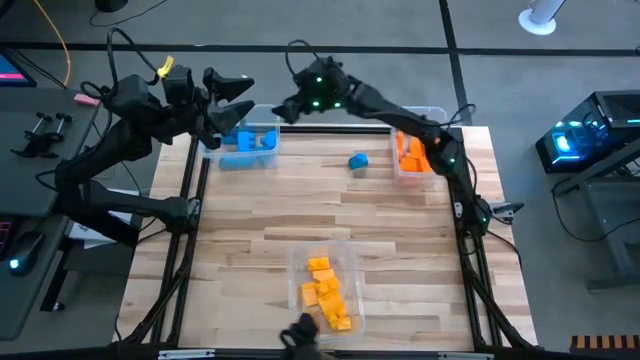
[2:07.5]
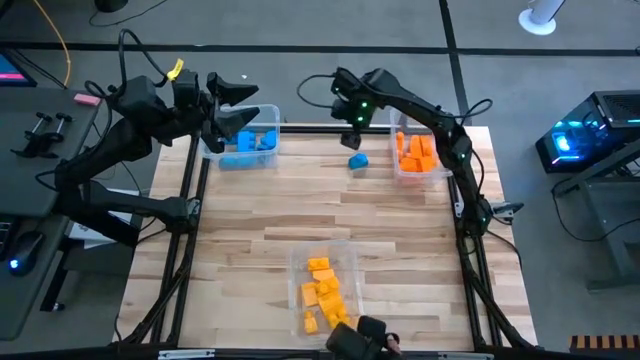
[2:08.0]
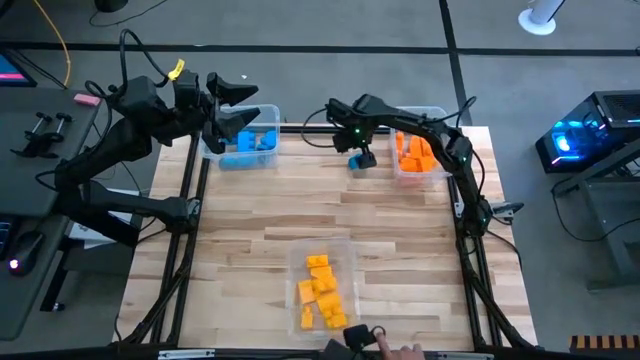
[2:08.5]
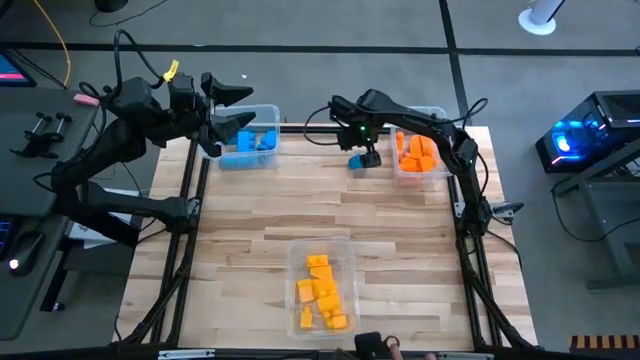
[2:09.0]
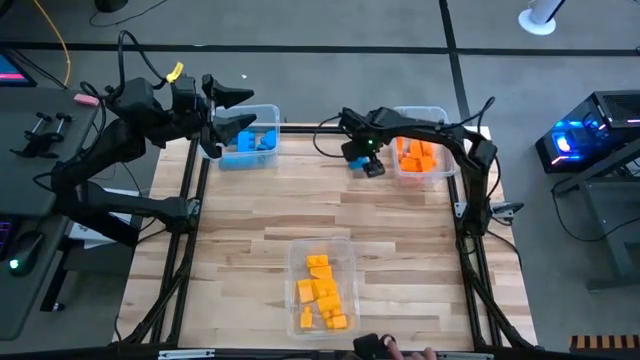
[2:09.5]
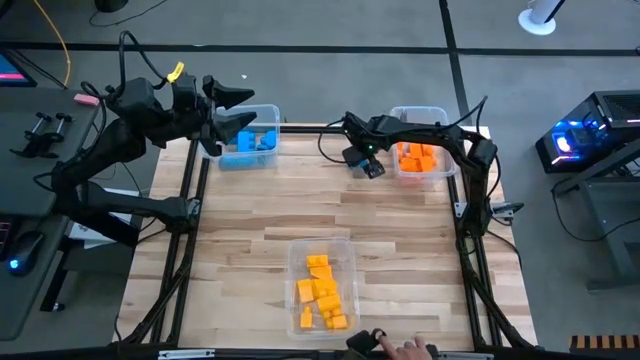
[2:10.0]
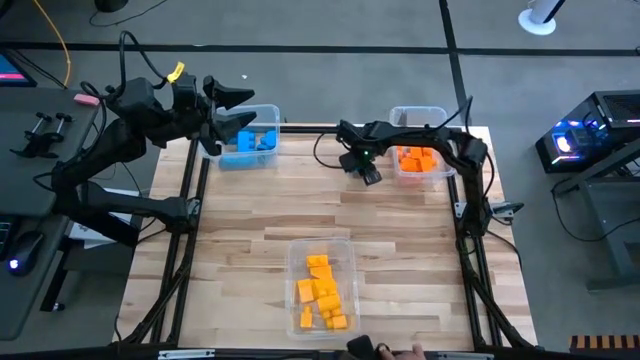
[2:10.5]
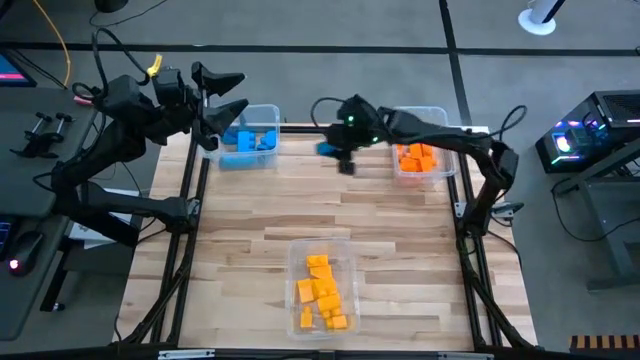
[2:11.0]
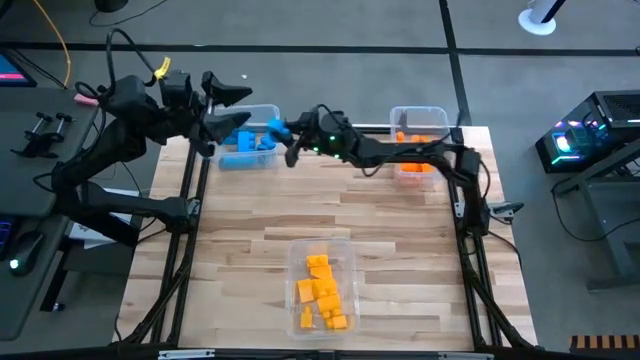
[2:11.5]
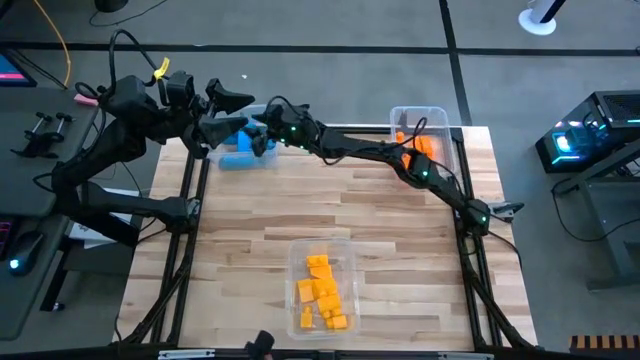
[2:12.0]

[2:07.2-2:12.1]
Task: Sort blocks
Put the blue game piece into the top left transparent bin

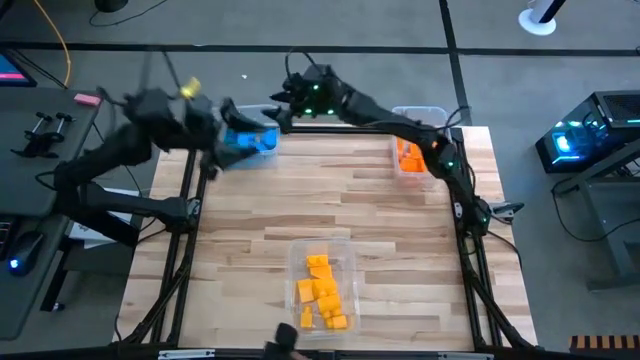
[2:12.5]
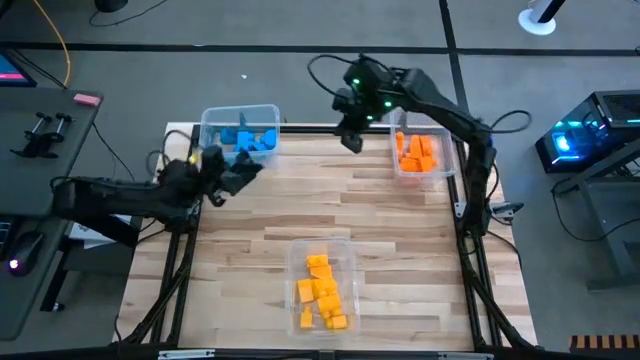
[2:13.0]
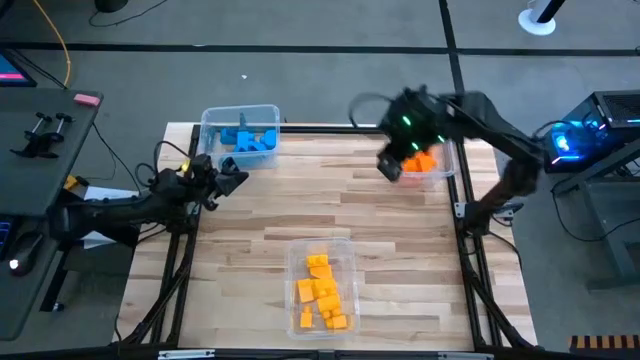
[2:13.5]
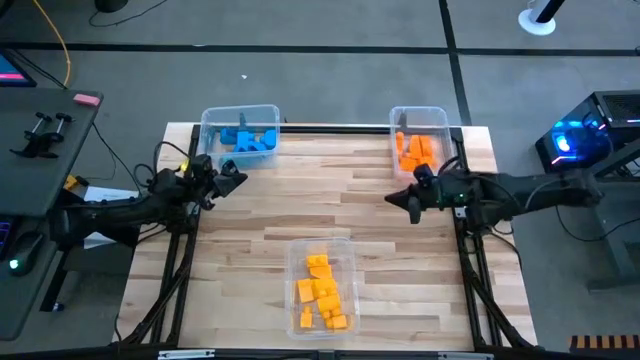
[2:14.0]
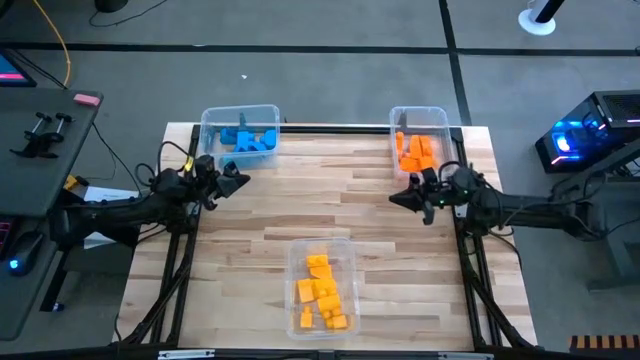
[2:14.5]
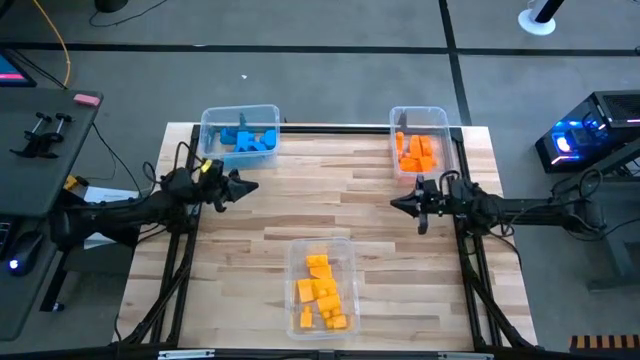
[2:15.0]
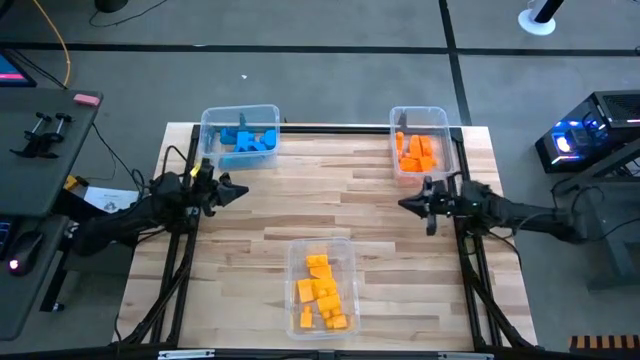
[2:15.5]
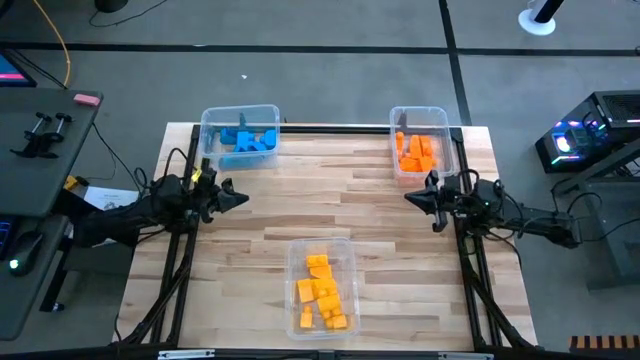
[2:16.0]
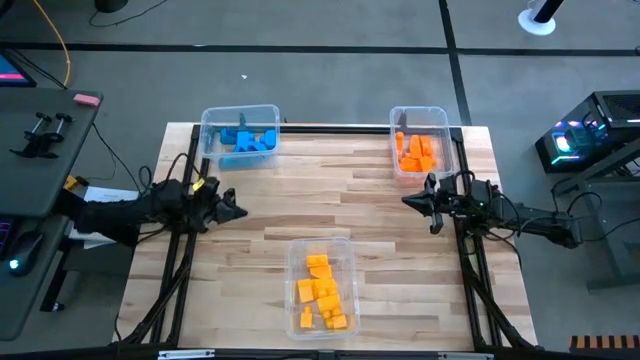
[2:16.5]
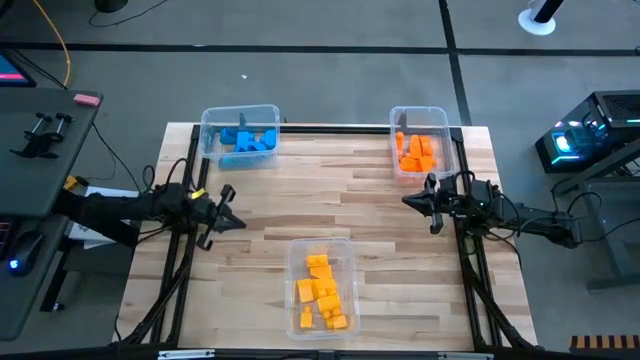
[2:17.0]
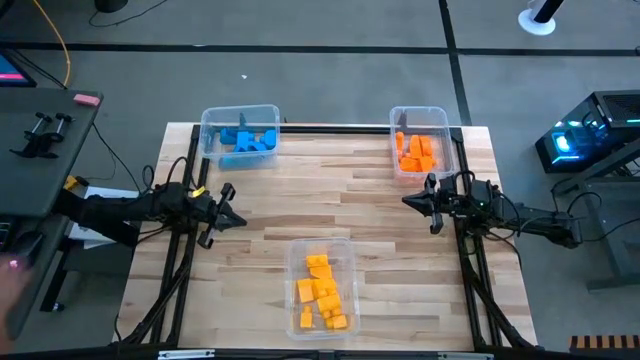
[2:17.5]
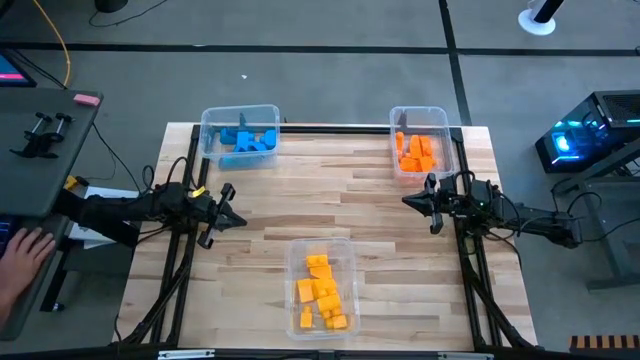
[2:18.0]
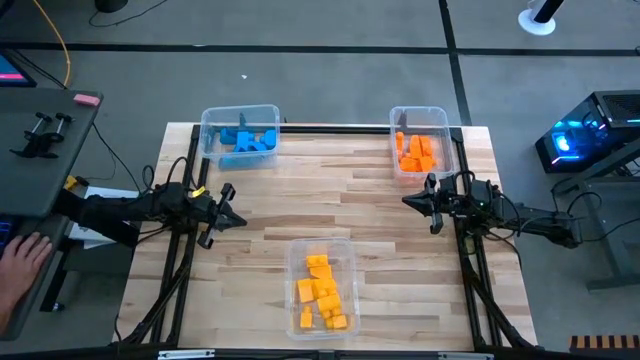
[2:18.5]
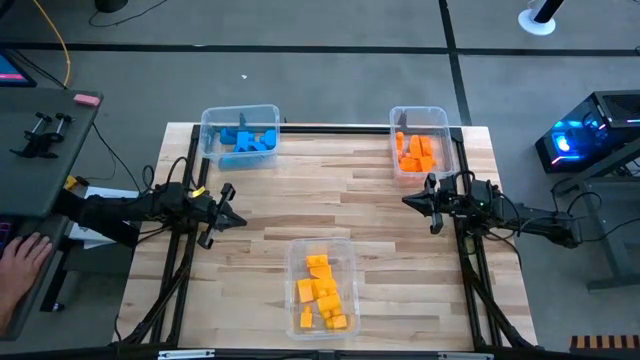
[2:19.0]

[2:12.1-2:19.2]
Return to Home Position

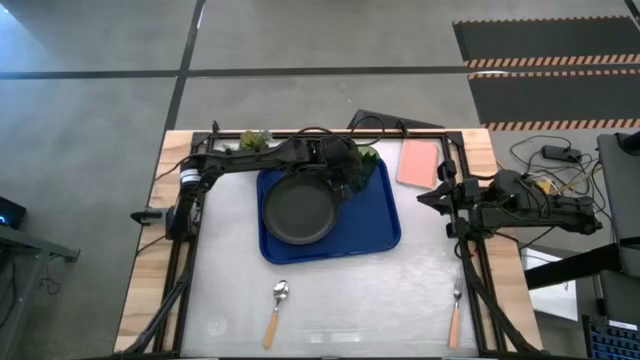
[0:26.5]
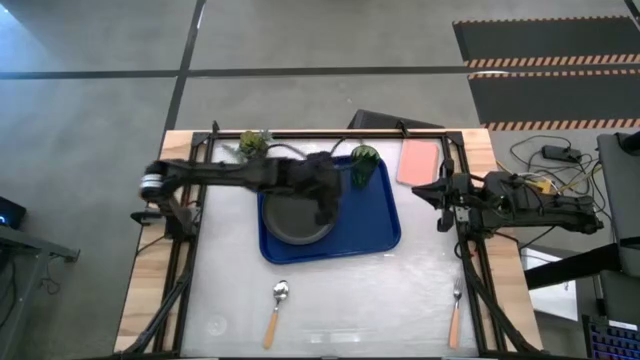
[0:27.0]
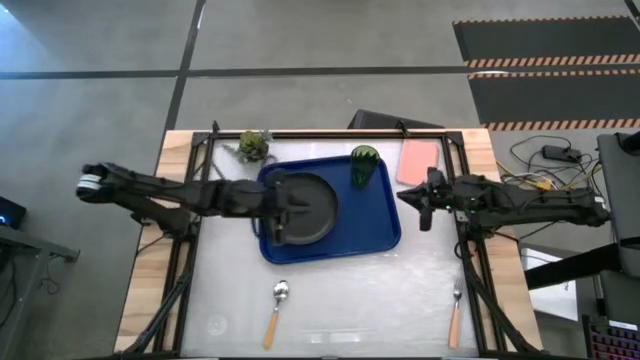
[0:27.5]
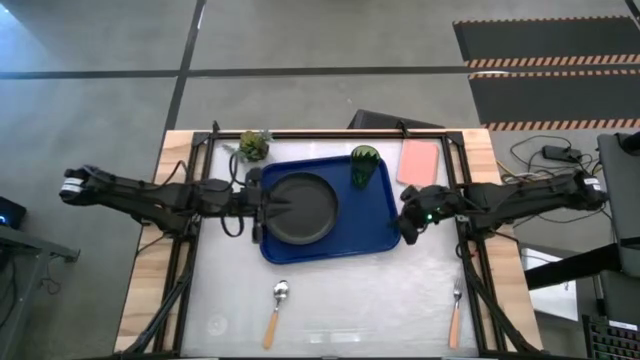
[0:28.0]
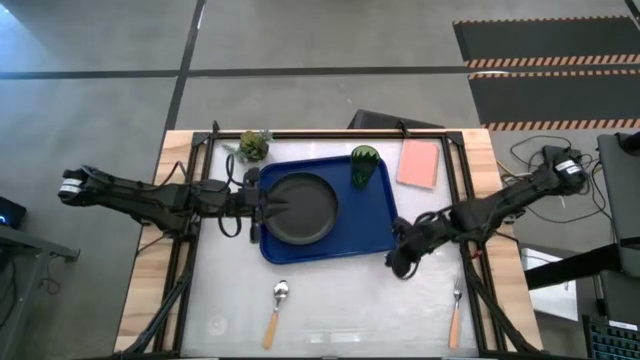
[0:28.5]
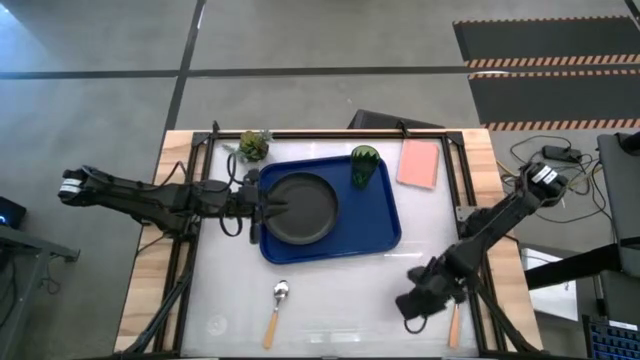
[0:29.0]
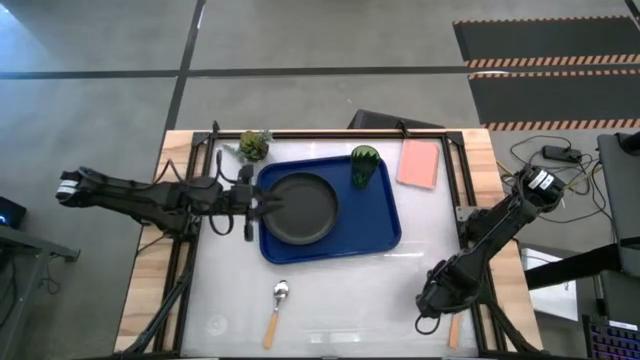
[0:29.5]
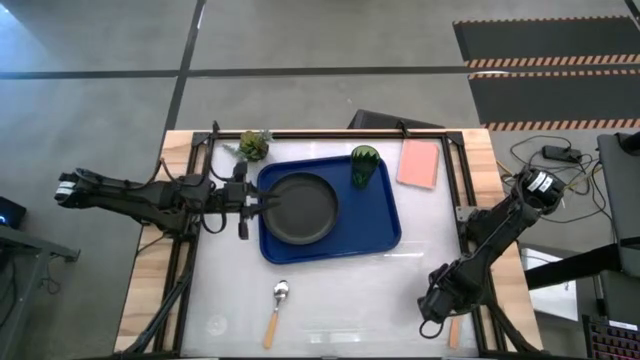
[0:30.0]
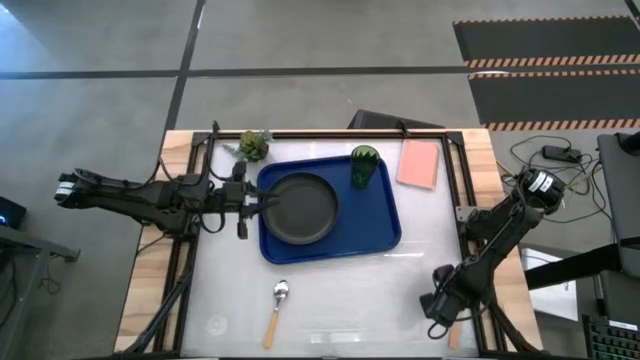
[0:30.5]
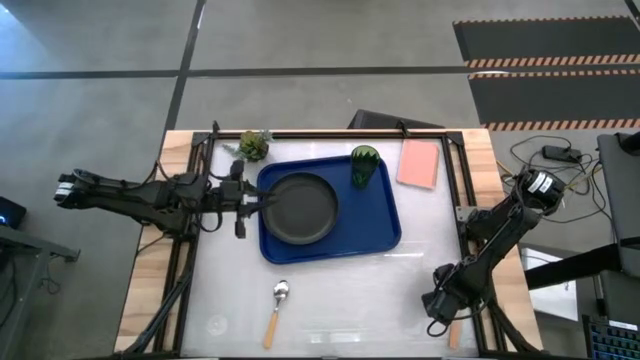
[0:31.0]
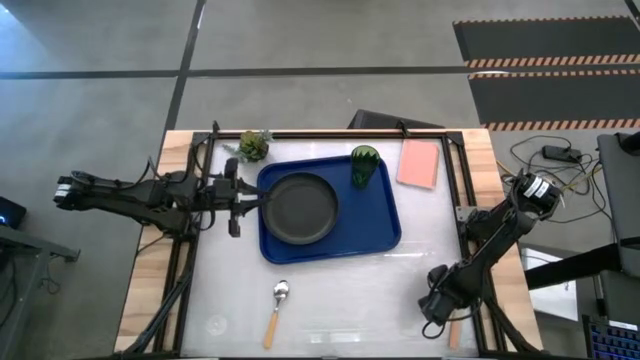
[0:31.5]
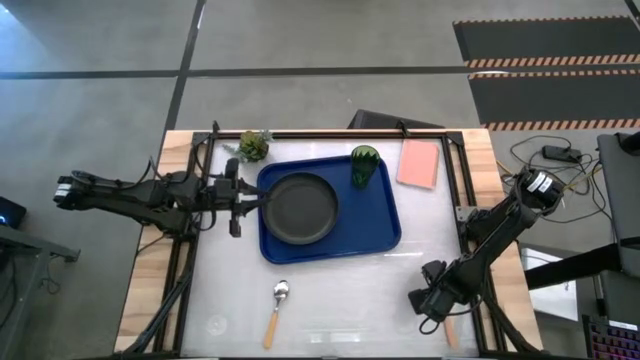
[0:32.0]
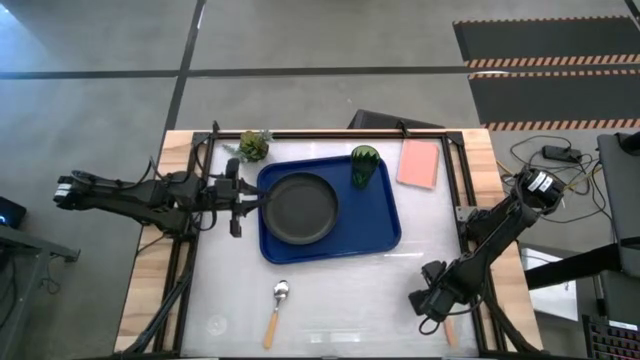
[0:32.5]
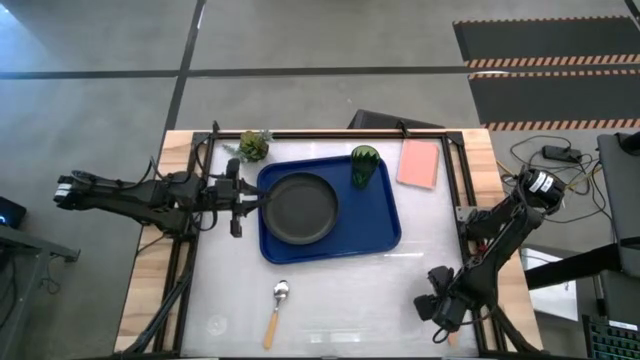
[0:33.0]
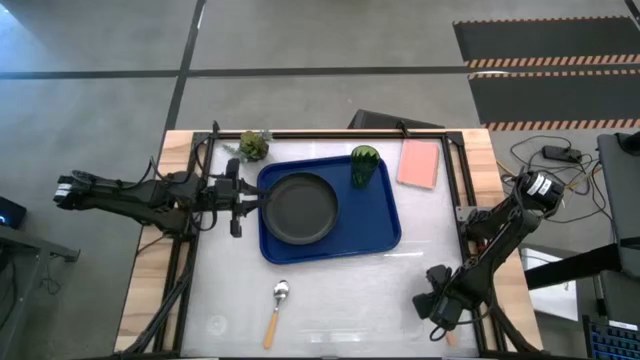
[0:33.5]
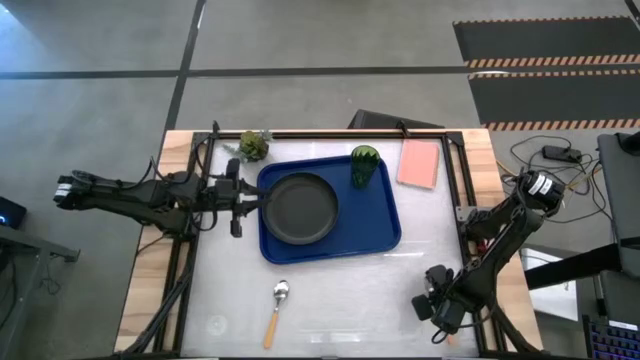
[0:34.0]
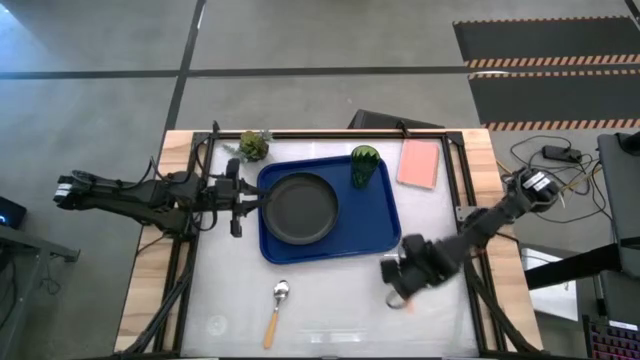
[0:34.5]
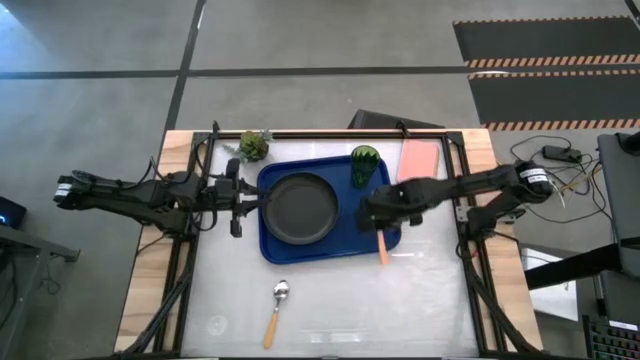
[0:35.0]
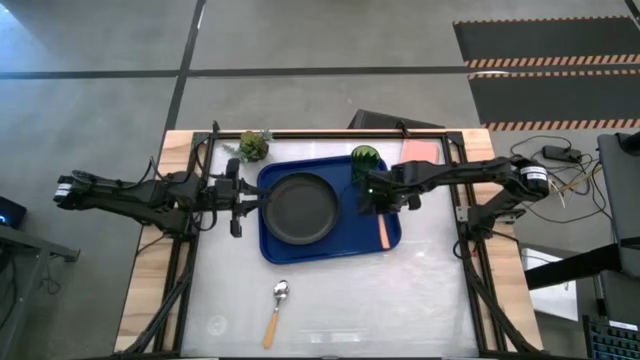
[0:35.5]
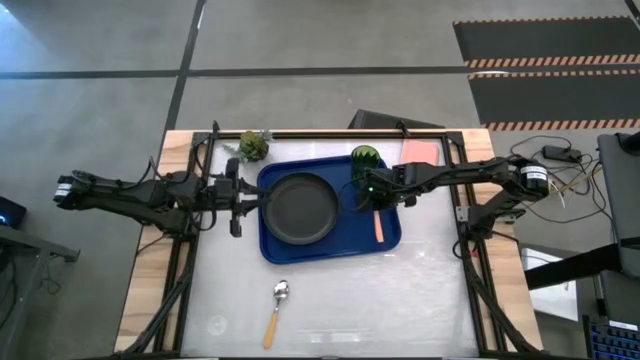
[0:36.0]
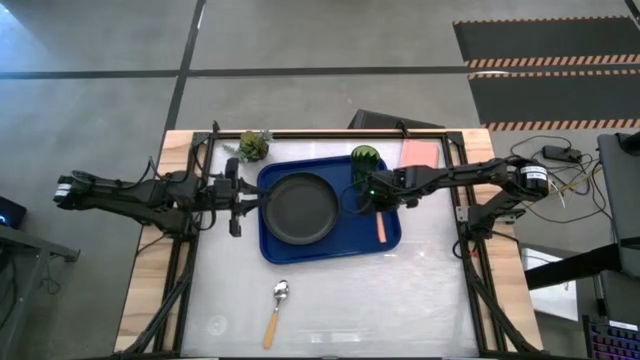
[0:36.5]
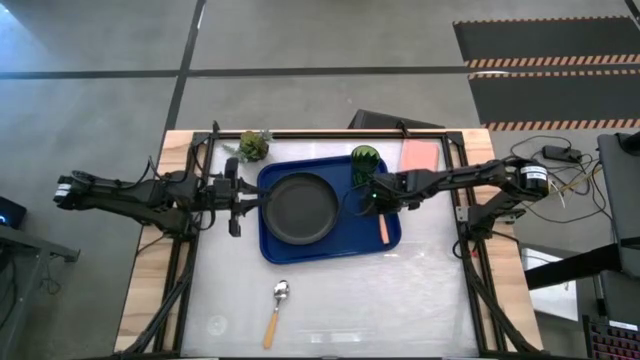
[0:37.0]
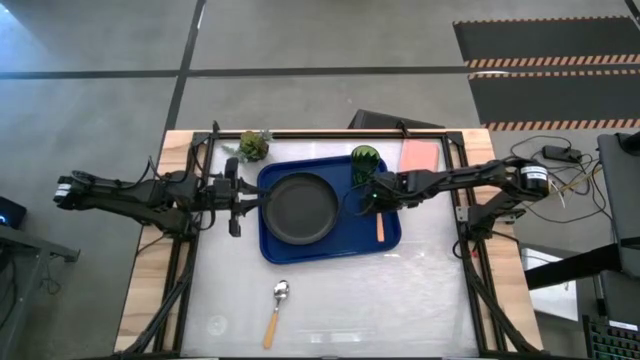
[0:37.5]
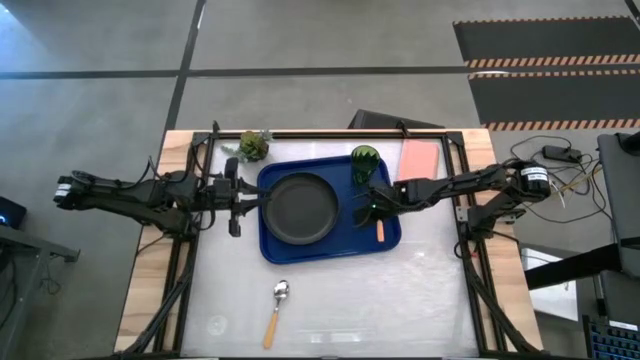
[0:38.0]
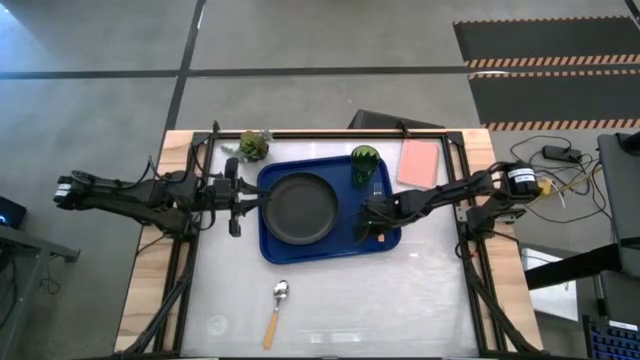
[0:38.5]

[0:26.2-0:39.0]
Task: Pick and place plate/cup/fork/spoon on tray
Put the orange fork on the blue tray to the bottom of the green cup
